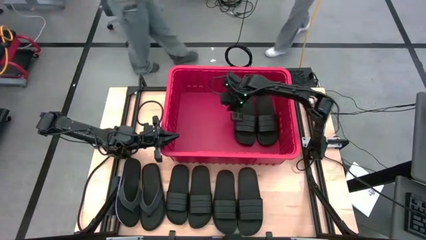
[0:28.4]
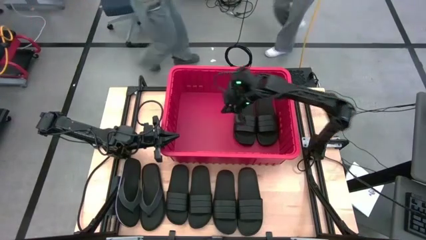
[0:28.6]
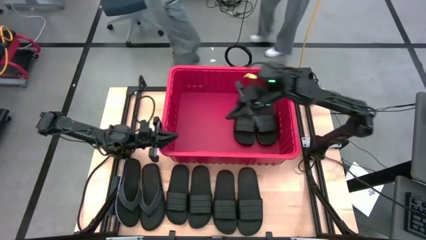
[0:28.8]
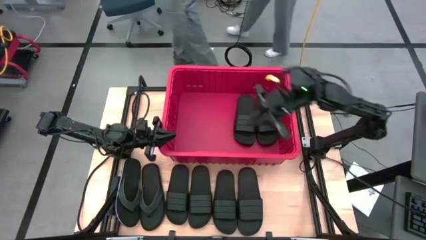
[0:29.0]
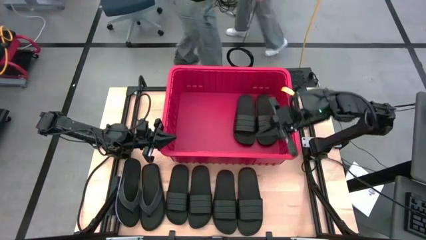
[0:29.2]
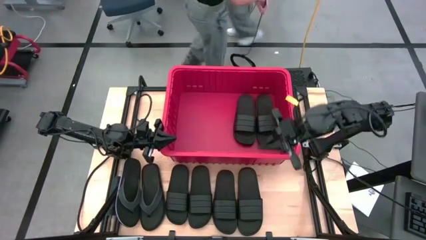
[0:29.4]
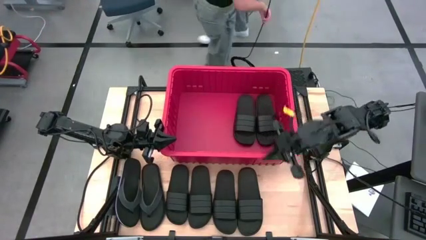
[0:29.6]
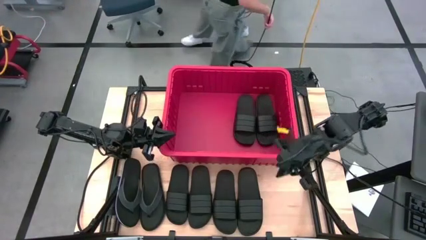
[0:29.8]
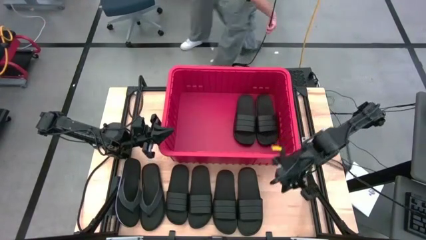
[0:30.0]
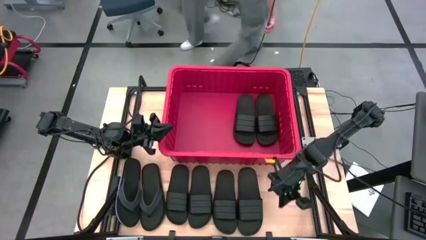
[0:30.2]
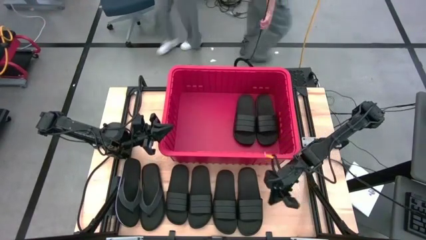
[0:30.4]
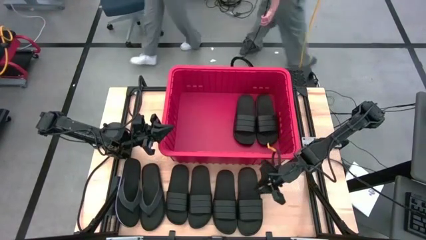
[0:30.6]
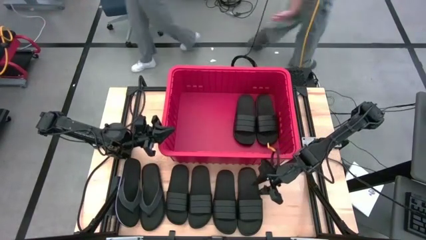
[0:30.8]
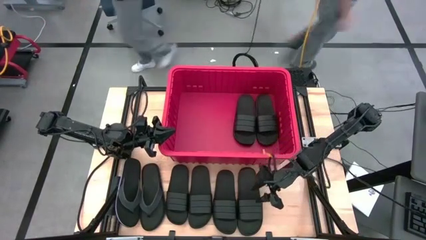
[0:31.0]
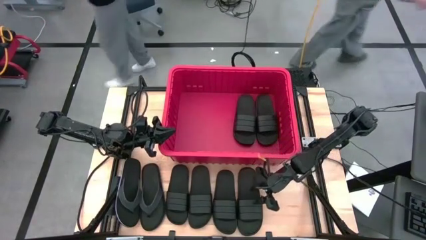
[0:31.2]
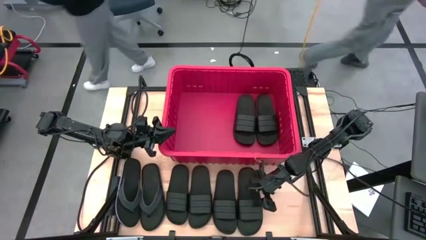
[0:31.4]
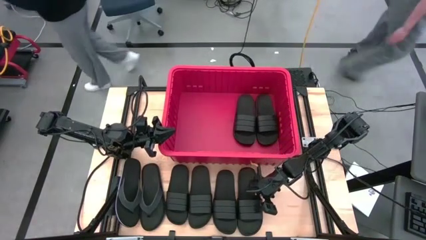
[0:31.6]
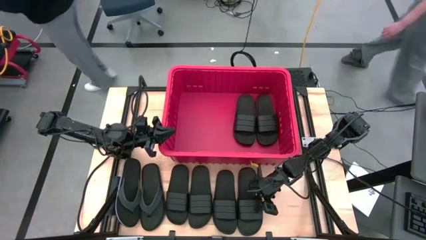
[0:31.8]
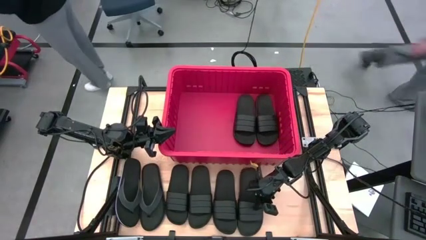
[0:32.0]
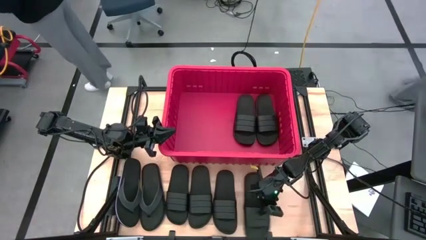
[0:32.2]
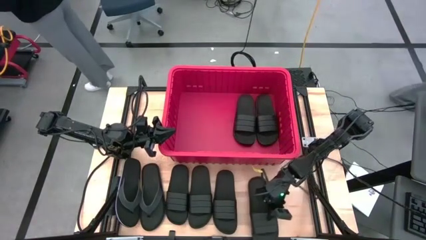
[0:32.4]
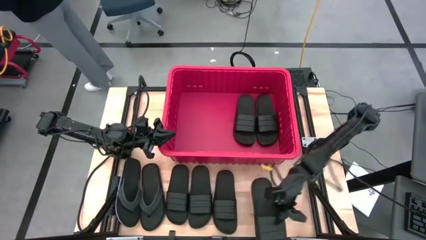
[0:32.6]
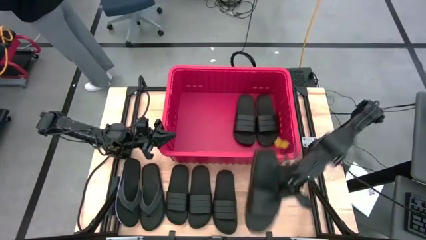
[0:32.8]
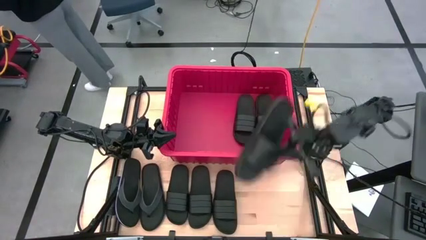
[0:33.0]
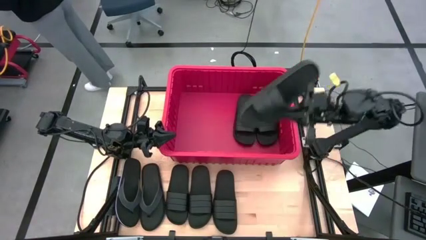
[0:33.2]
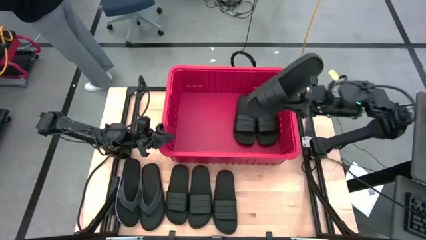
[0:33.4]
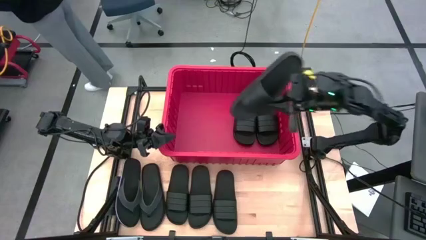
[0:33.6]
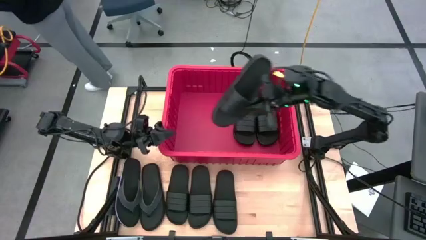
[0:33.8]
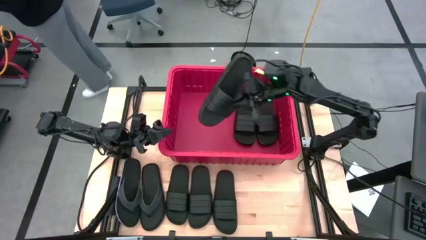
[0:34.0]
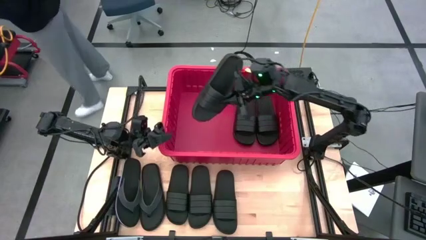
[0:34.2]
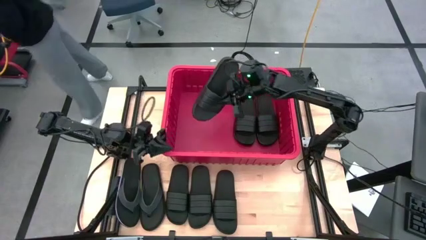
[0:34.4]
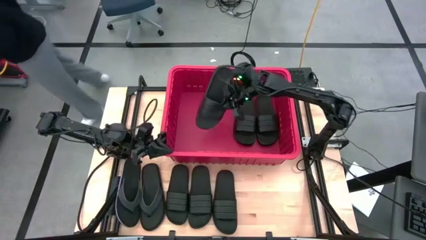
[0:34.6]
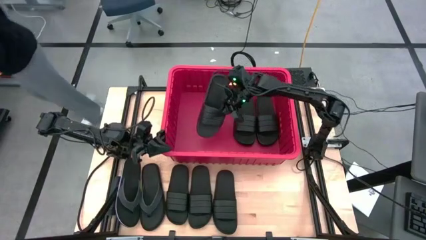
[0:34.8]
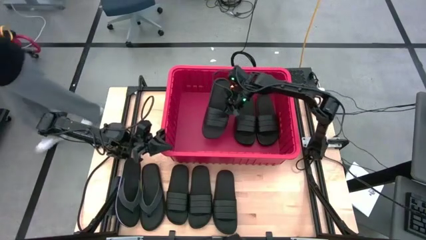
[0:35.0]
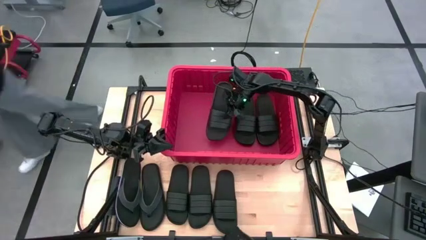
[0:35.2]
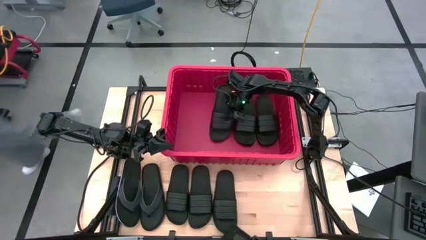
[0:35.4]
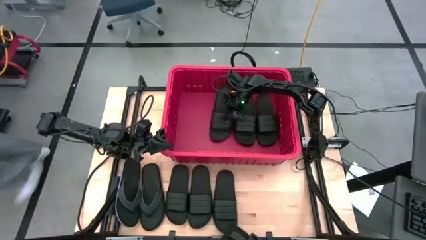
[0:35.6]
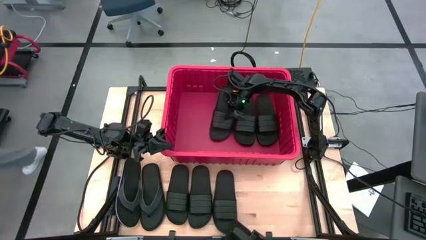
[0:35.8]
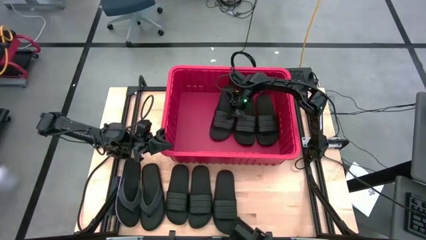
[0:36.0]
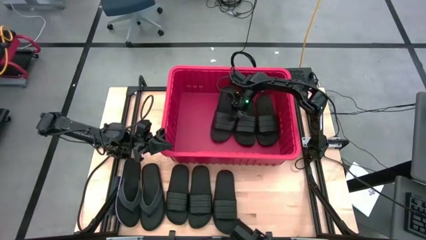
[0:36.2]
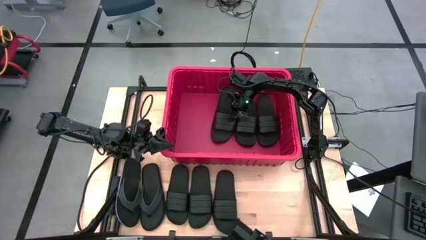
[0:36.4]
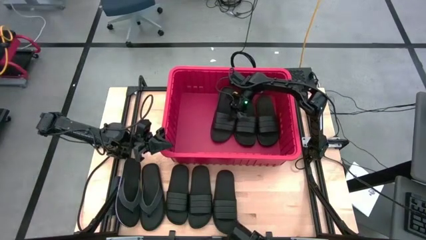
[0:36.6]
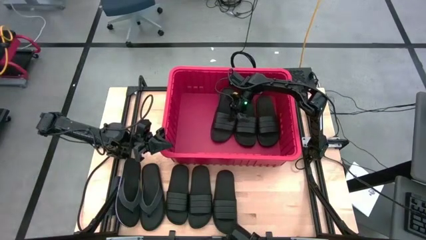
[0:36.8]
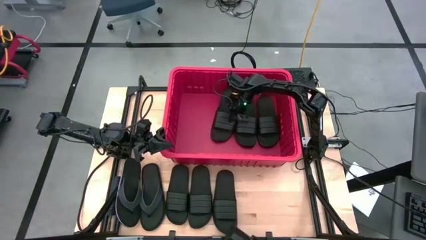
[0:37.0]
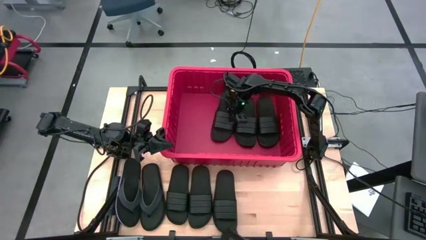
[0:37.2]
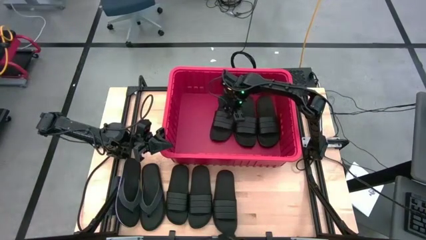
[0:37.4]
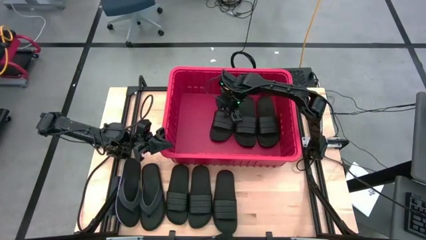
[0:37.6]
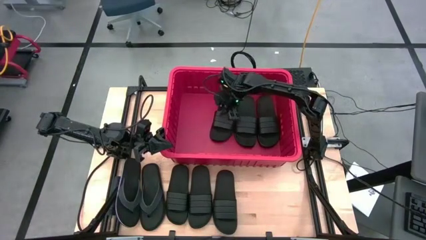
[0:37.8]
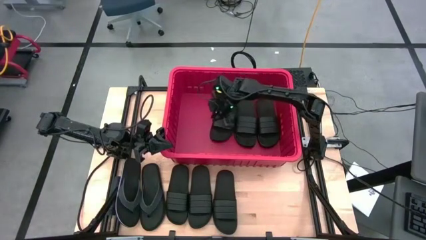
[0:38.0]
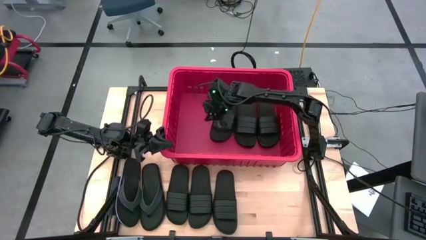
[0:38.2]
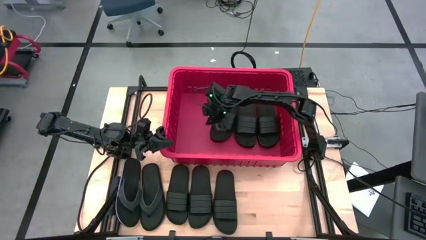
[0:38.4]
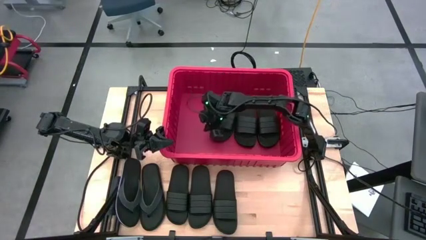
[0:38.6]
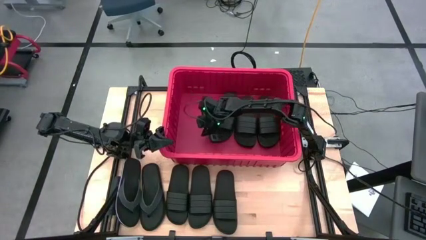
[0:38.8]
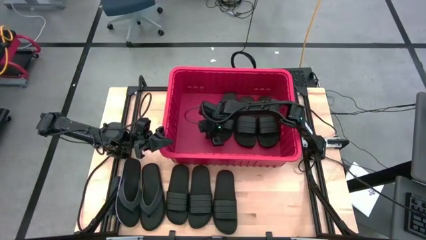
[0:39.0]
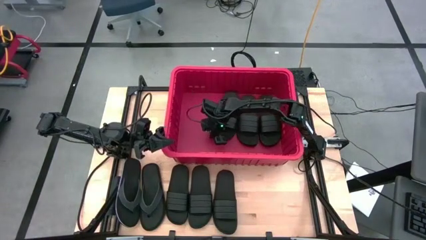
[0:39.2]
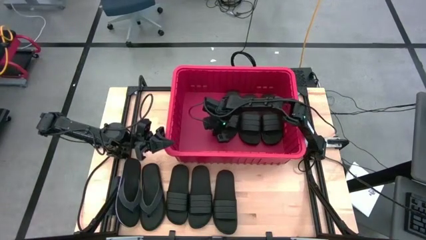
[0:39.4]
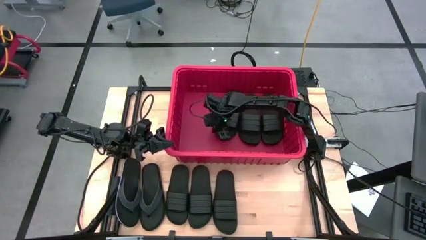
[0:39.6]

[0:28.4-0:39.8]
Task: Pick and place slides into bin
Put the black slide into the red bin
